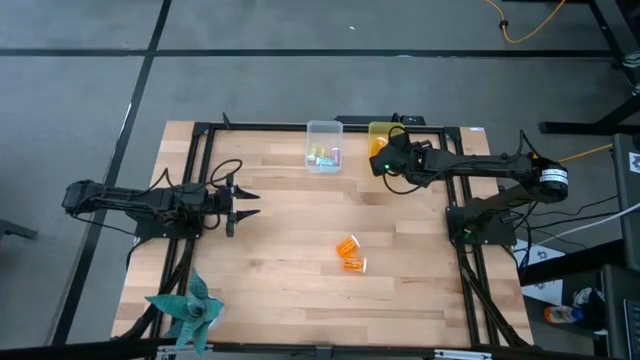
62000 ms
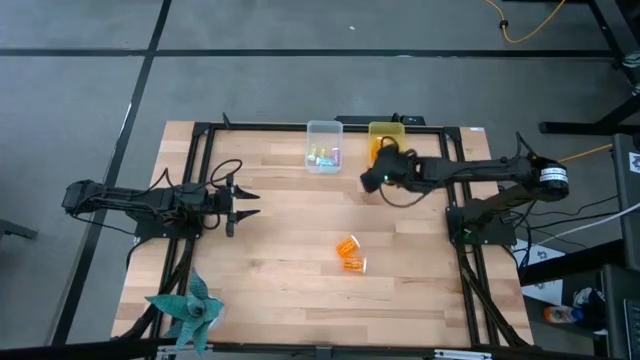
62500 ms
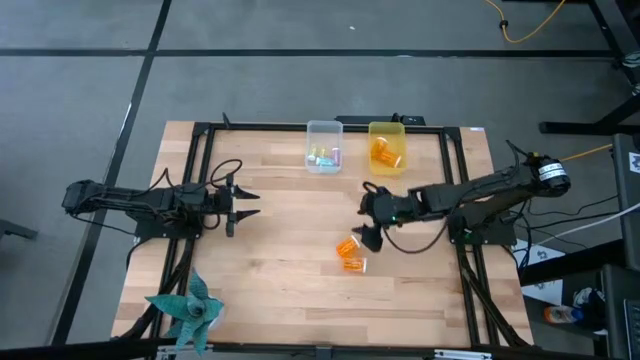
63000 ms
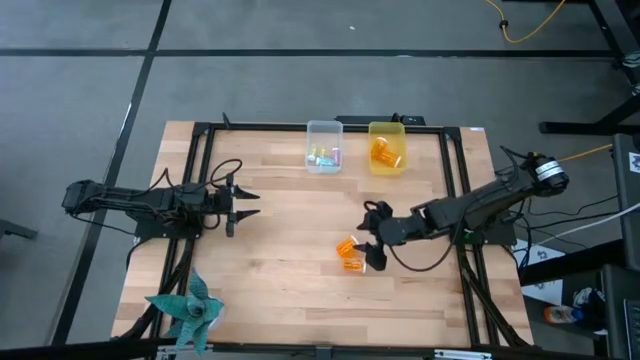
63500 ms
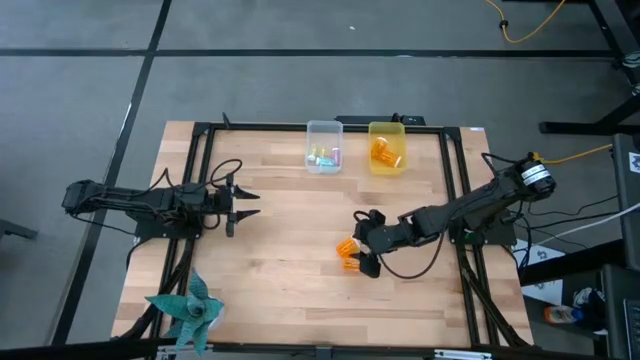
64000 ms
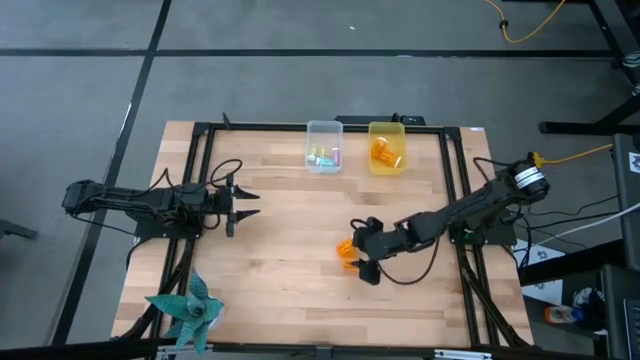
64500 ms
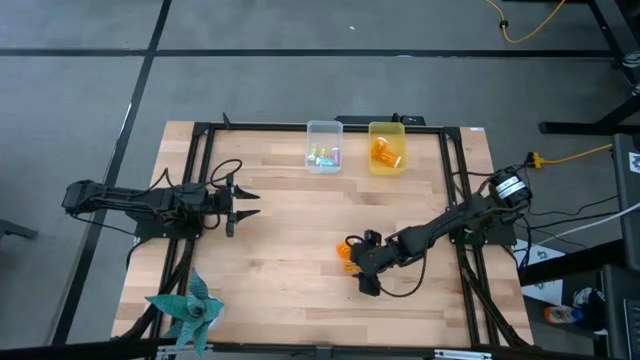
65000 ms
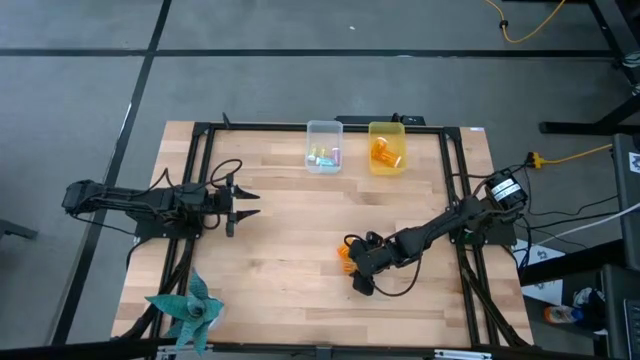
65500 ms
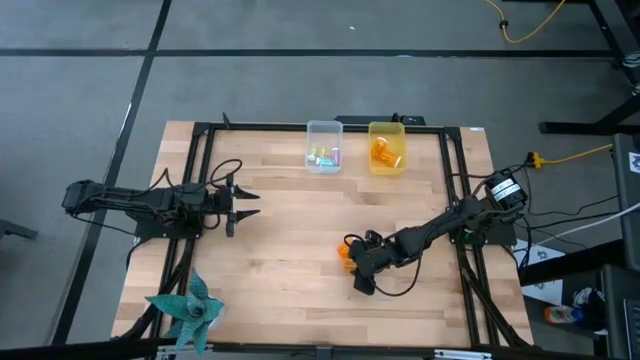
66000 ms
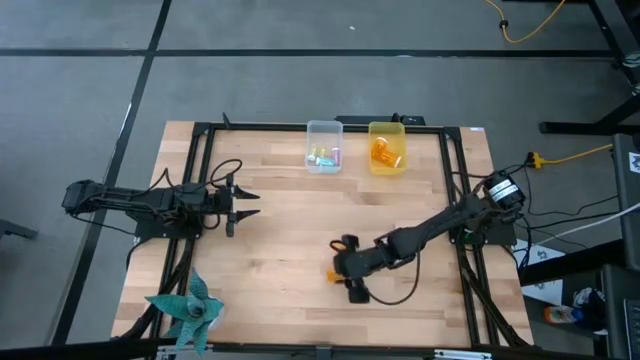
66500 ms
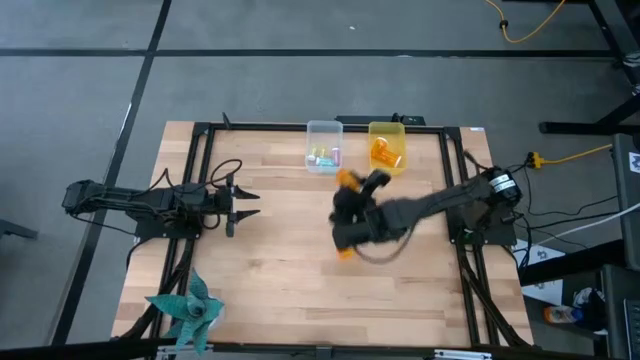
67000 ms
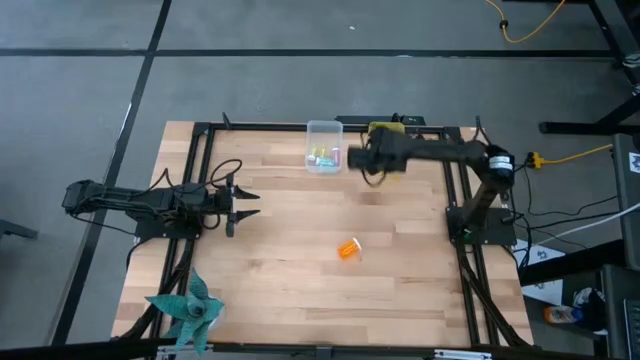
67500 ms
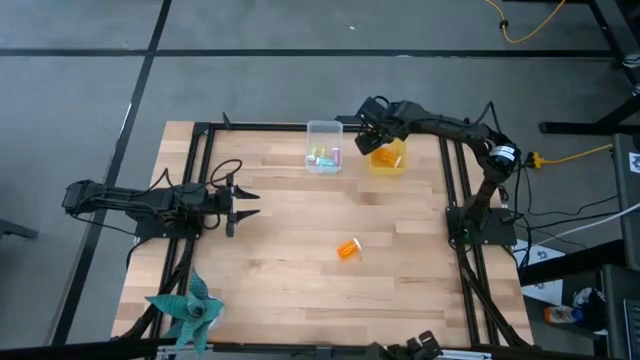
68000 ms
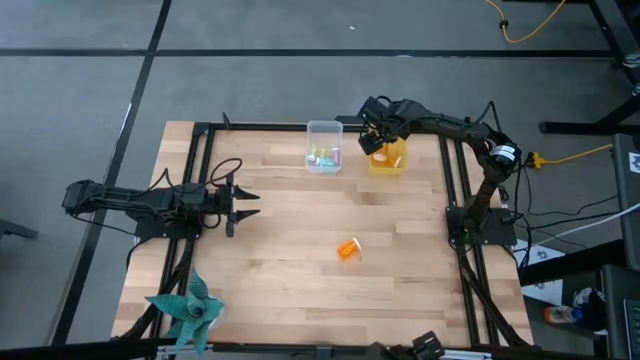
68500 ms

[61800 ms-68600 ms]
Task: Pick and place medicine bottles into bin by pill shape (circle, oval)
Put the large orange pill bottle into the yellow bin

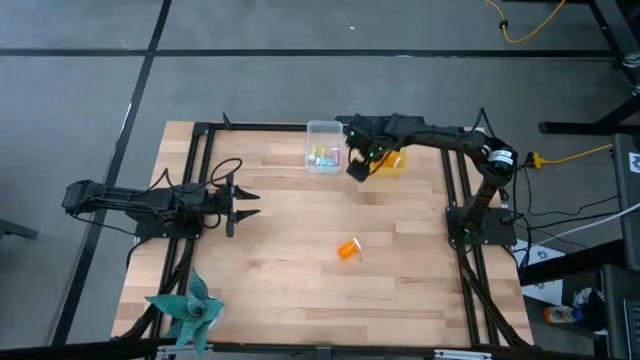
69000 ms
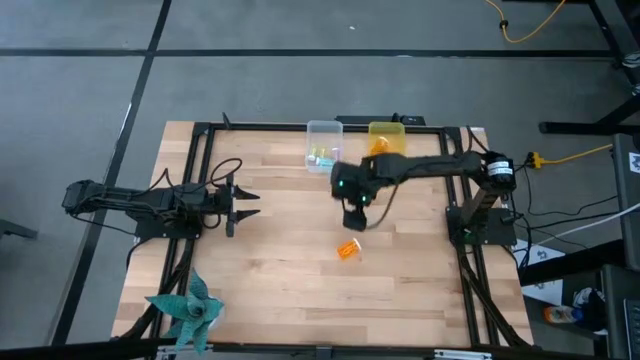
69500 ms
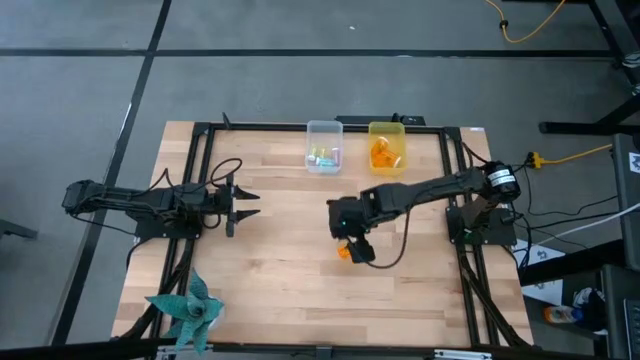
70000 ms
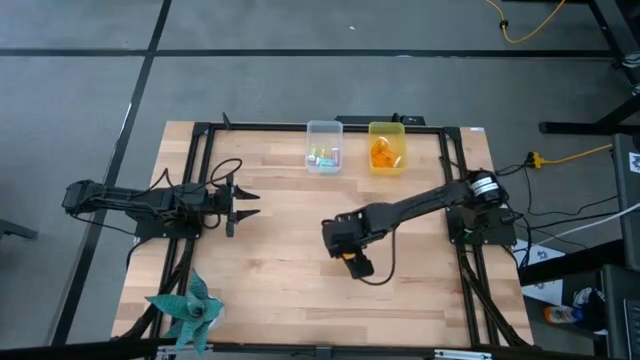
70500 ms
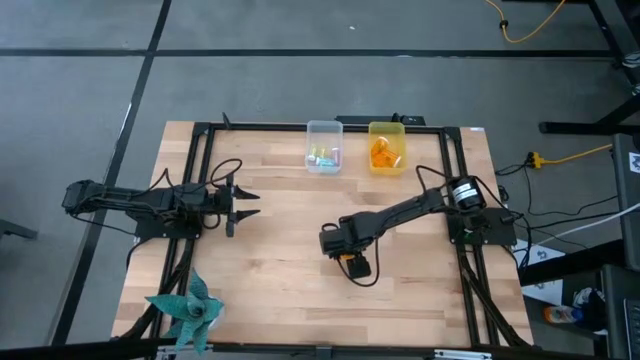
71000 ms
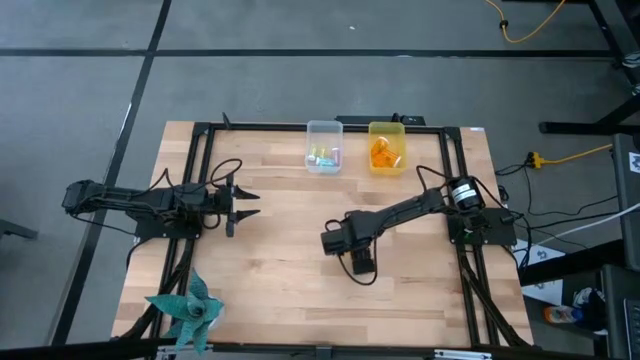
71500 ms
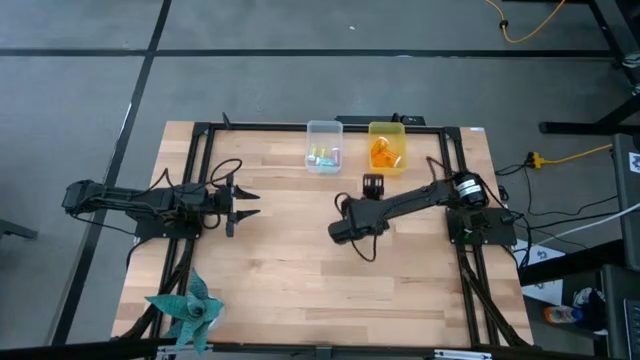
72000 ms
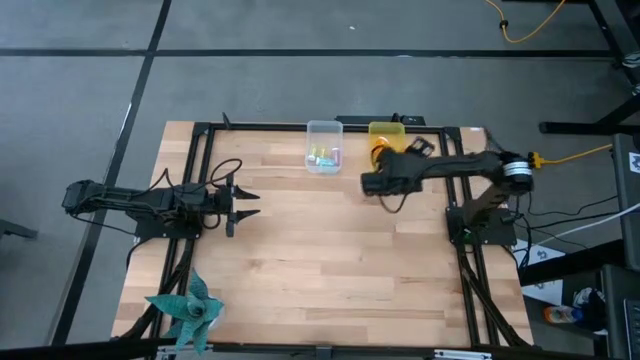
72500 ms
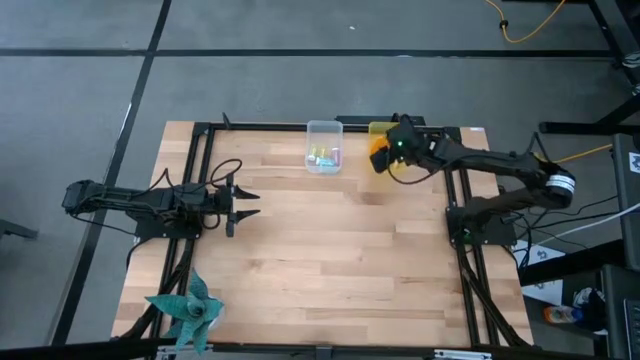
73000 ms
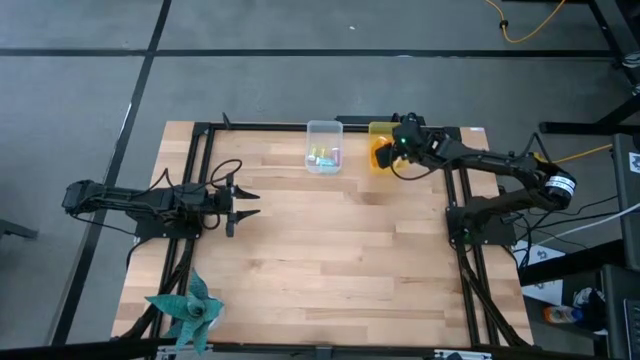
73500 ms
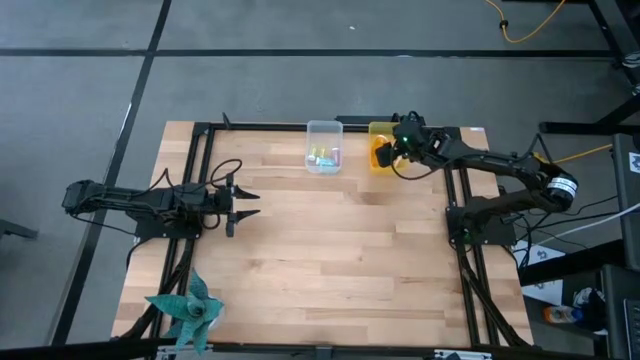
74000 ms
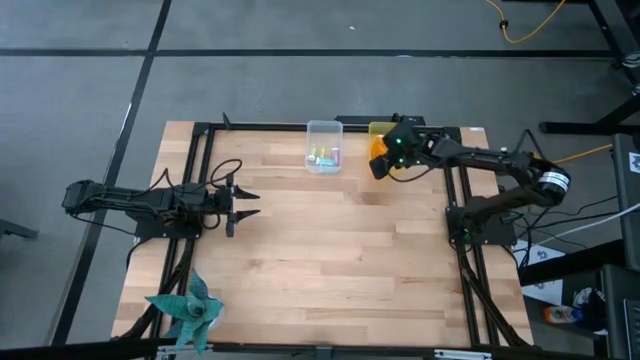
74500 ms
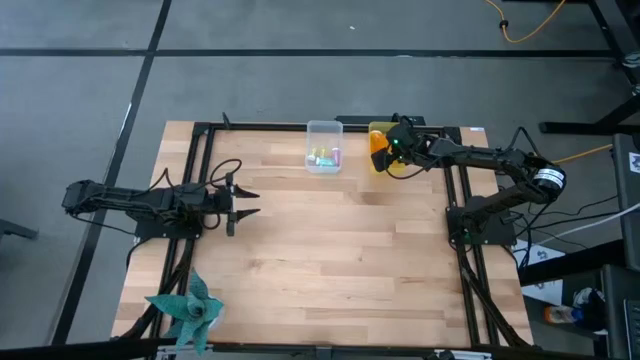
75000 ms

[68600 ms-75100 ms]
Put the large orange pill bottle into the yellow bin

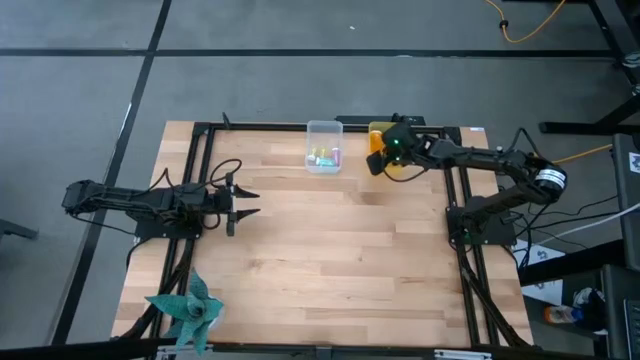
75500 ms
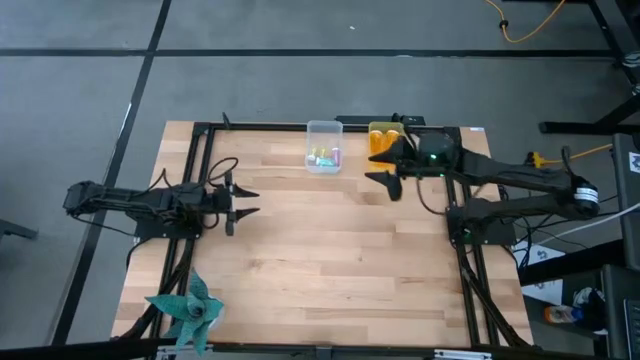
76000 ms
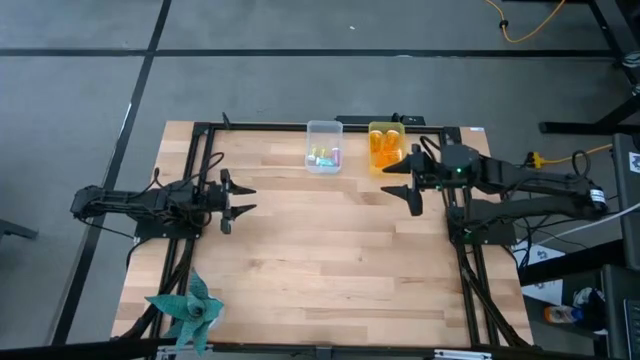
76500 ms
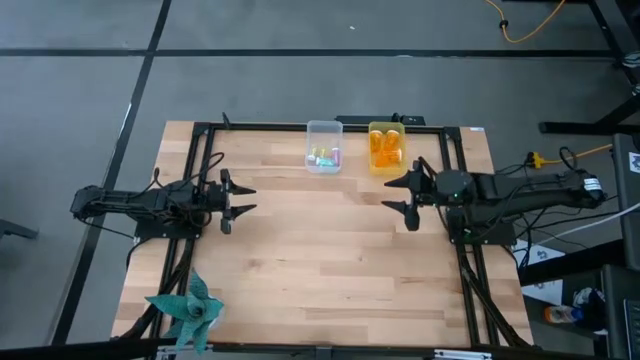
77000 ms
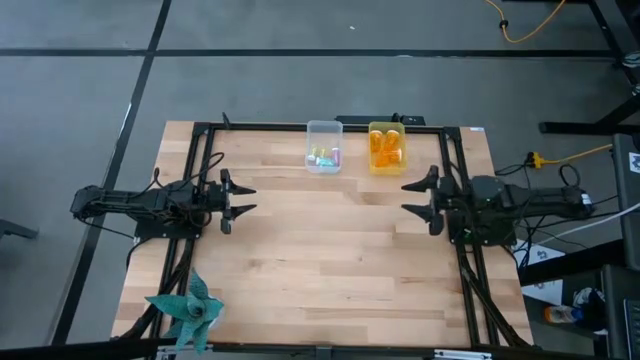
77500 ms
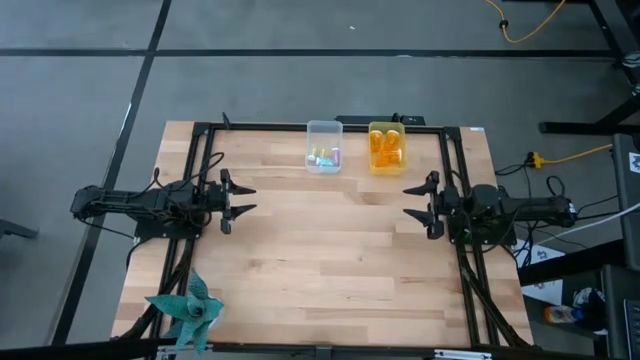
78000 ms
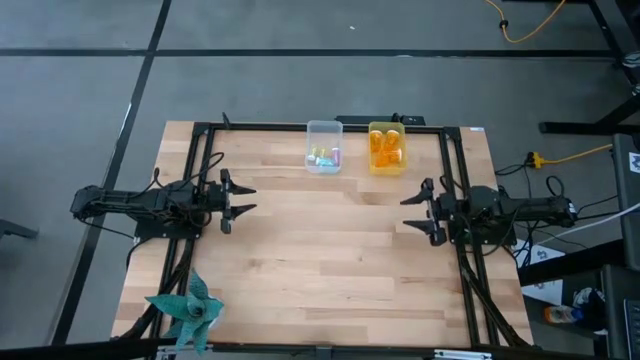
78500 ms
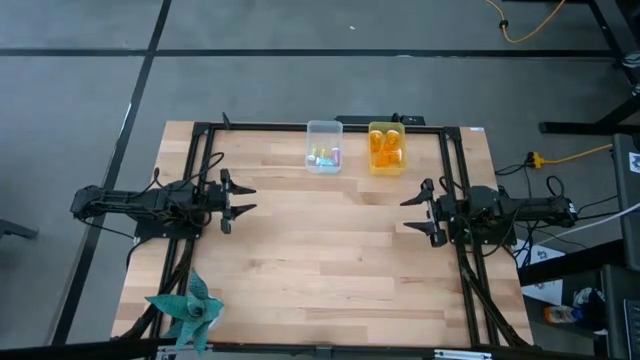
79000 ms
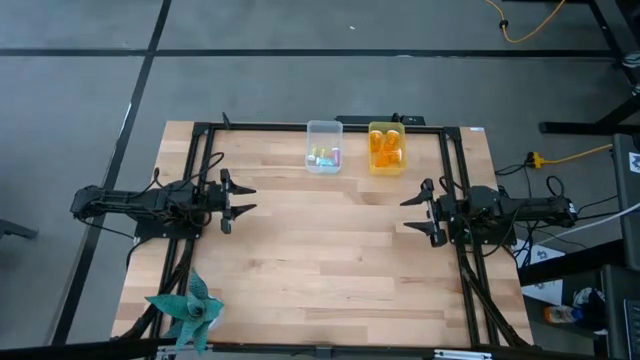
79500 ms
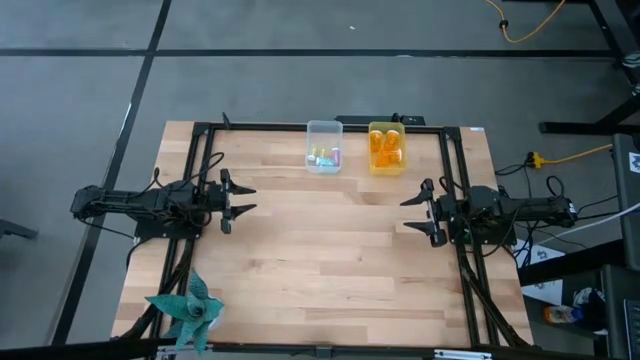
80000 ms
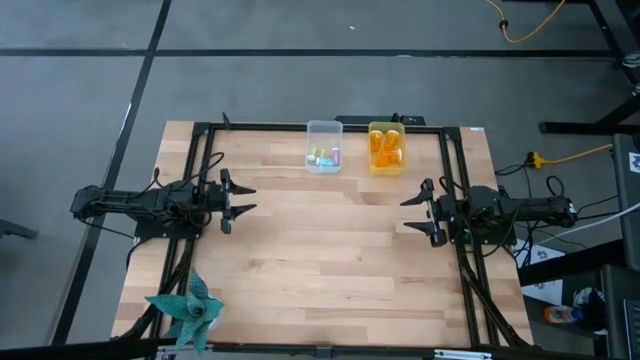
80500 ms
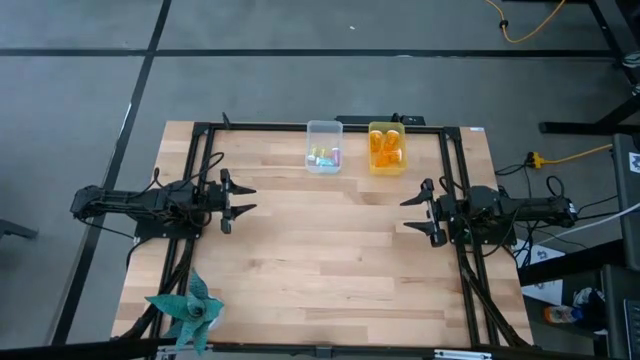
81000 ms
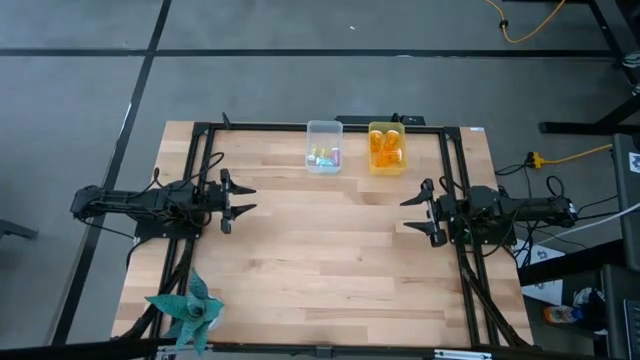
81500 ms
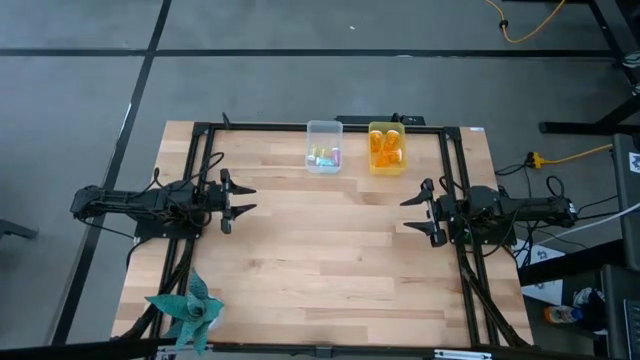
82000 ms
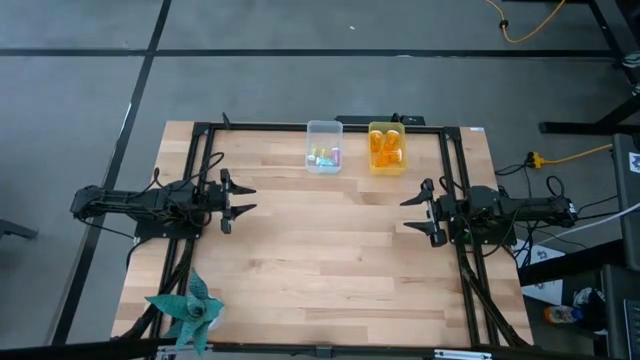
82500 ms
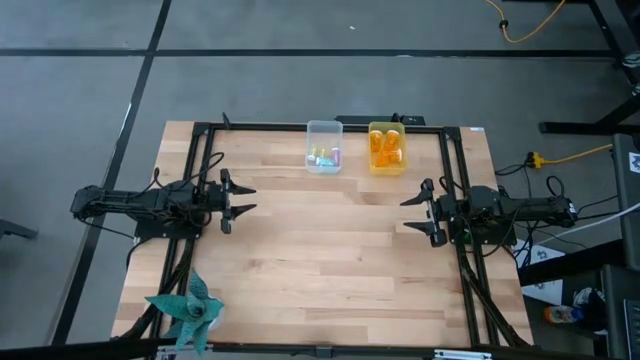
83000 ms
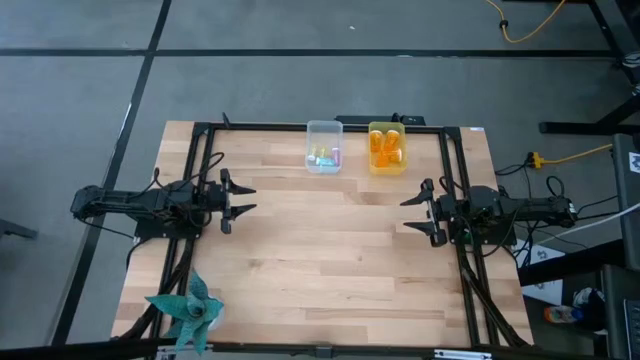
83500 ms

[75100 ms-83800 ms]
Return to Home Position
